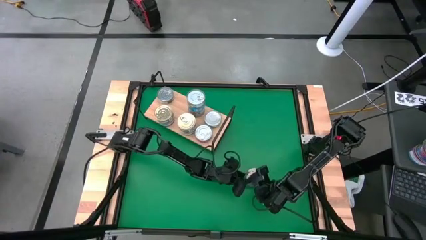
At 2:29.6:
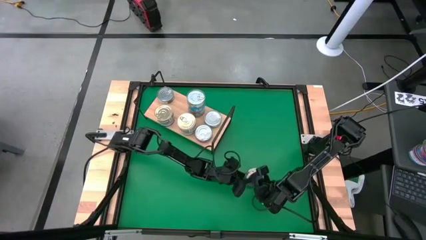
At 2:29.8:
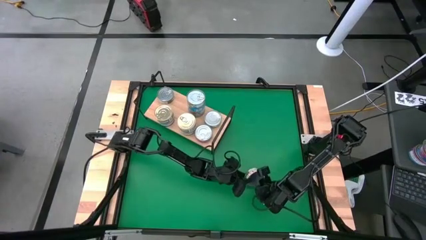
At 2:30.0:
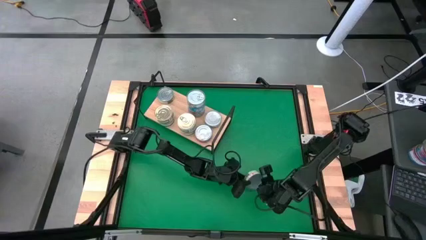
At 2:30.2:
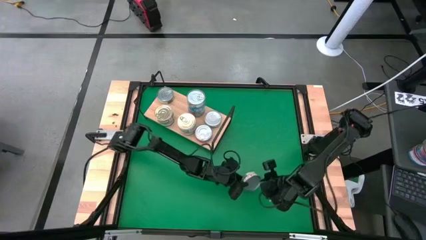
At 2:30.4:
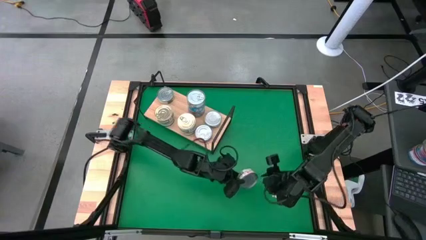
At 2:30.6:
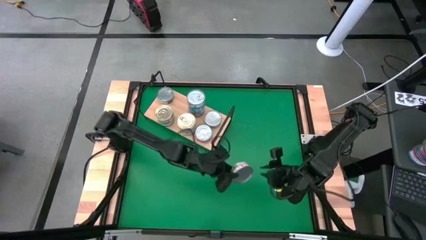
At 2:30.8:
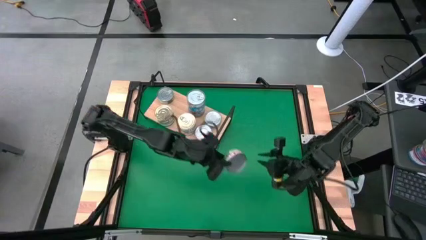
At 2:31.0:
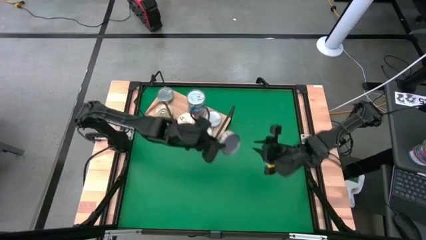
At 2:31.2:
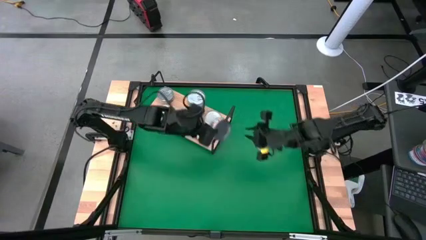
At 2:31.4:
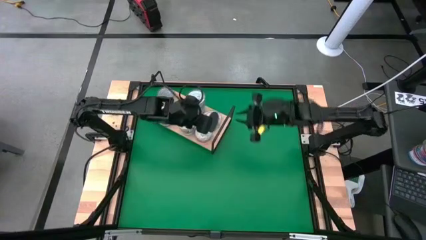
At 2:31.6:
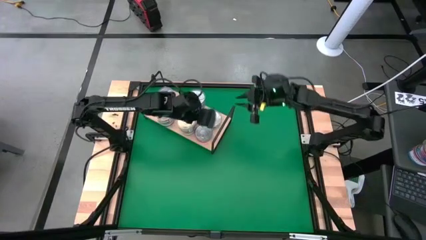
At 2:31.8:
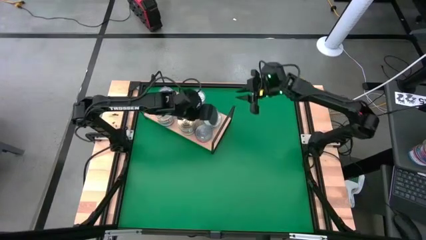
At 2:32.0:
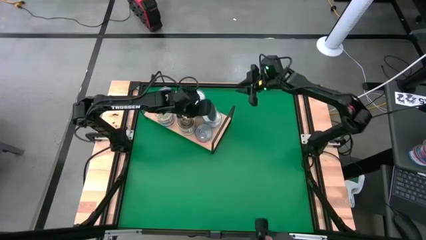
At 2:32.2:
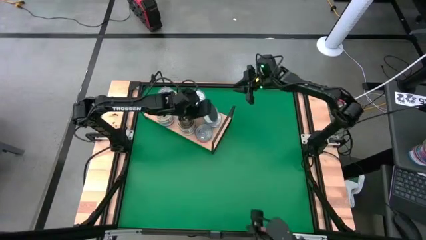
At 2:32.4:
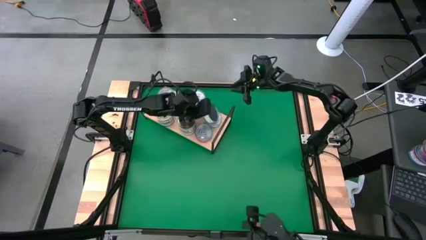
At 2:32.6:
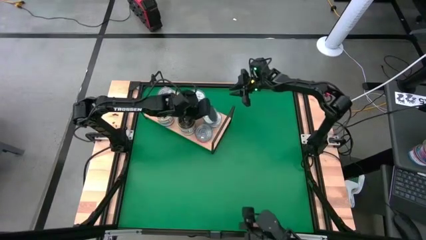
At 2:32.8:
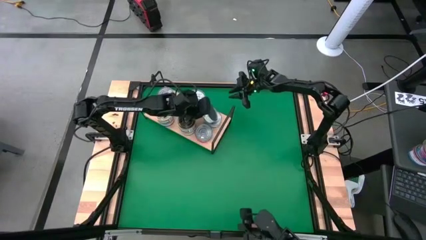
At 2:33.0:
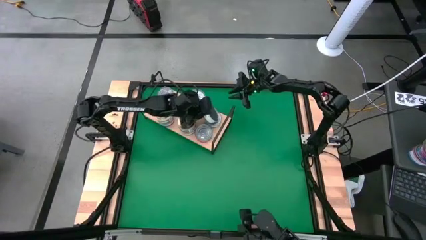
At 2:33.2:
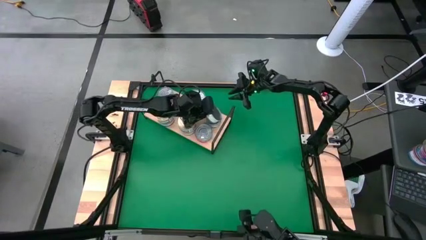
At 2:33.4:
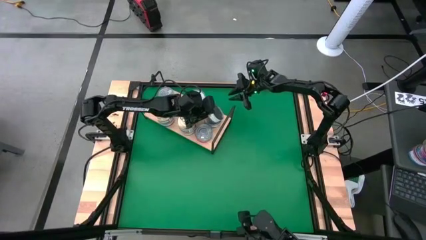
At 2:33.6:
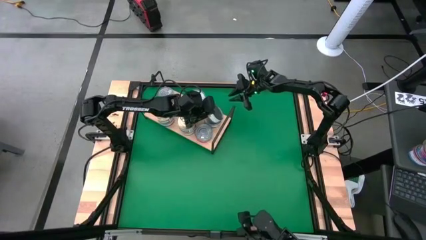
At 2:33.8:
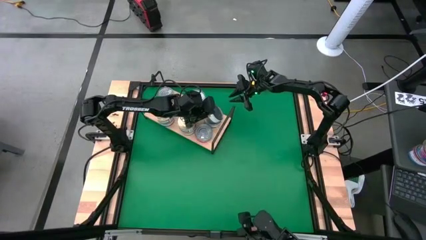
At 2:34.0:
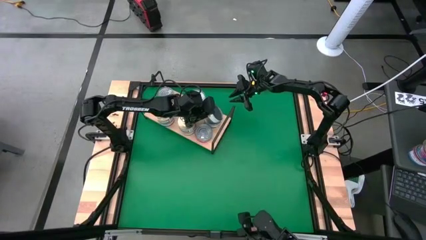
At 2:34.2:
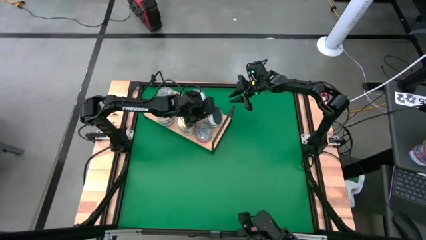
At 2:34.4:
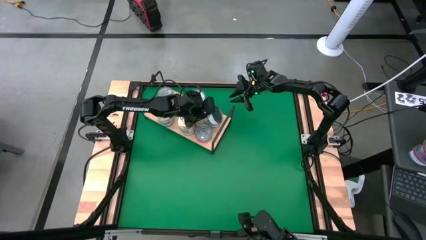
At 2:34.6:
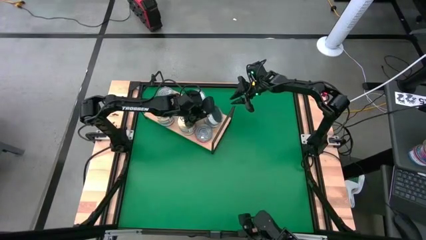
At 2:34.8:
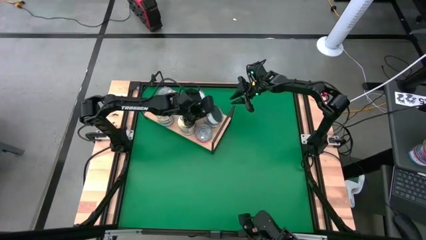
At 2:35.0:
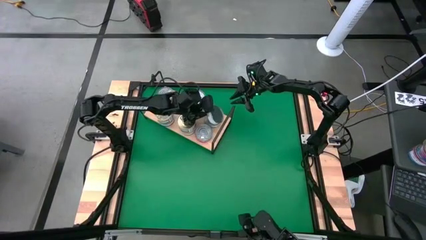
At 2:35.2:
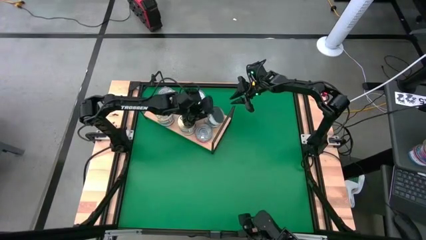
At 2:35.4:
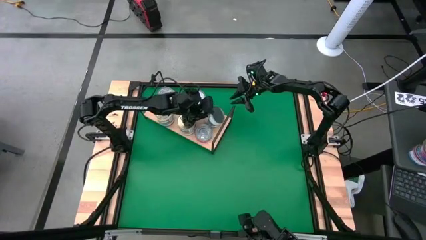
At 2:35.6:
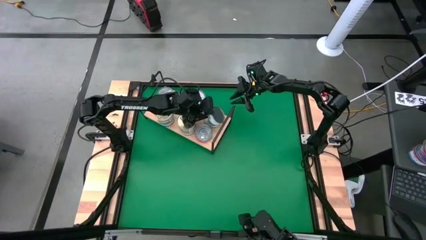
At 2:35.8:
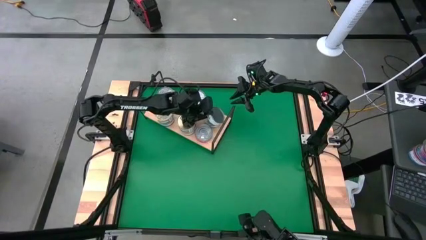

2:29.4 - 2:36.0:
Task: Stack canned seafood by type on shelf
Stack the green tuna can on top of the green tuna can

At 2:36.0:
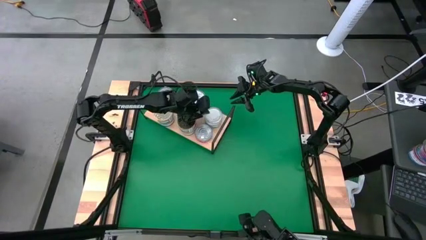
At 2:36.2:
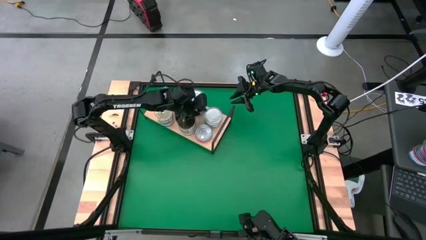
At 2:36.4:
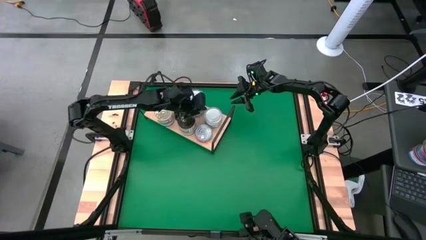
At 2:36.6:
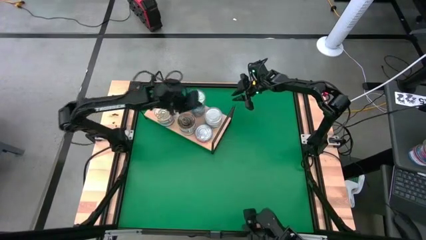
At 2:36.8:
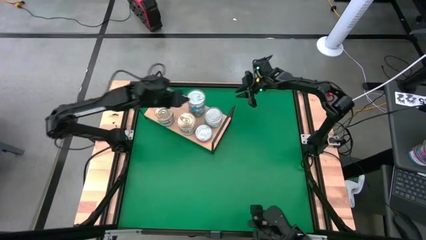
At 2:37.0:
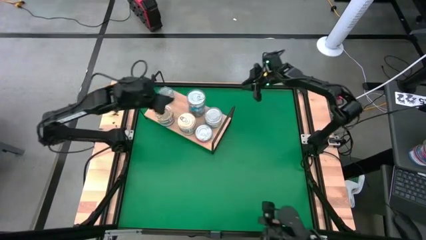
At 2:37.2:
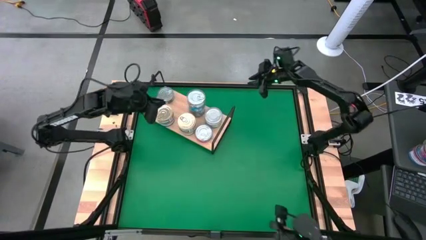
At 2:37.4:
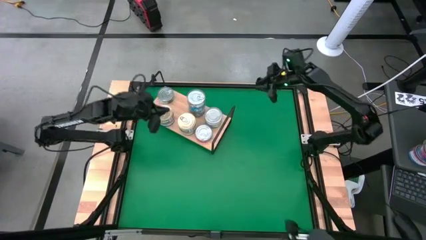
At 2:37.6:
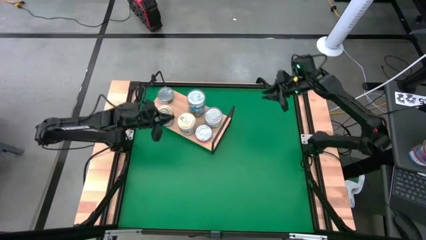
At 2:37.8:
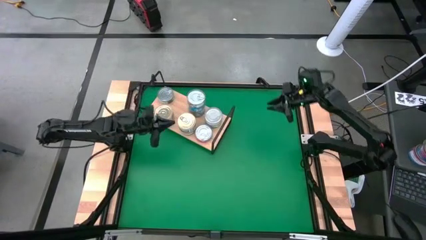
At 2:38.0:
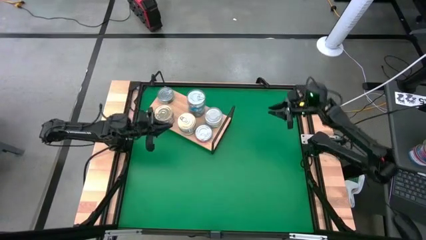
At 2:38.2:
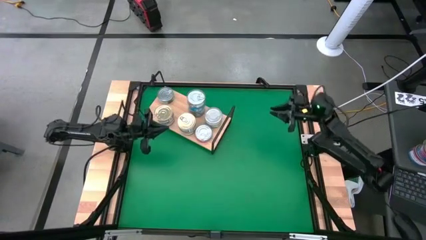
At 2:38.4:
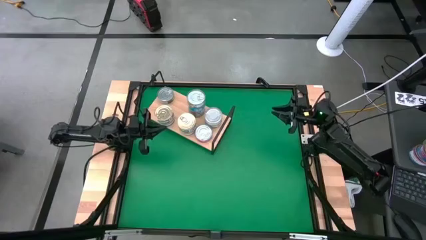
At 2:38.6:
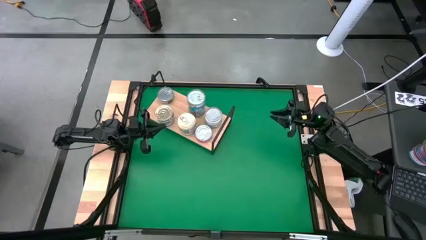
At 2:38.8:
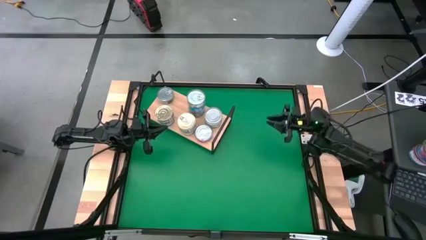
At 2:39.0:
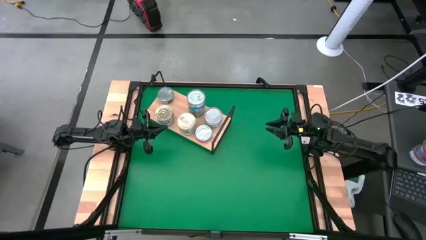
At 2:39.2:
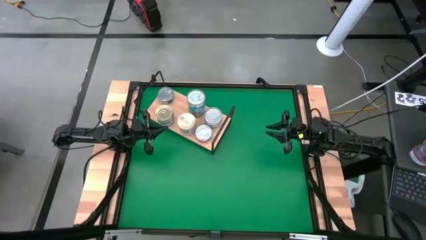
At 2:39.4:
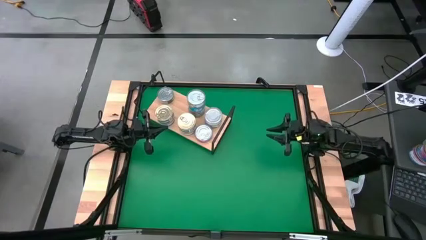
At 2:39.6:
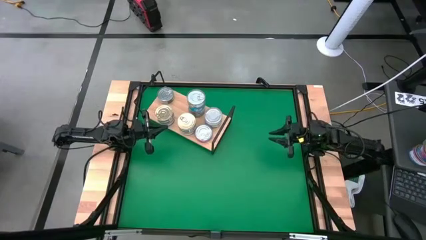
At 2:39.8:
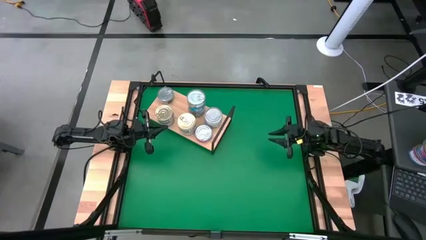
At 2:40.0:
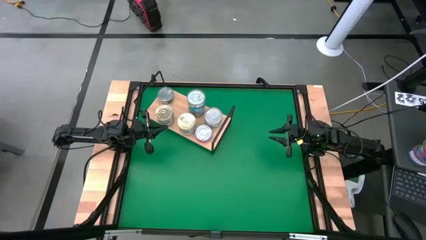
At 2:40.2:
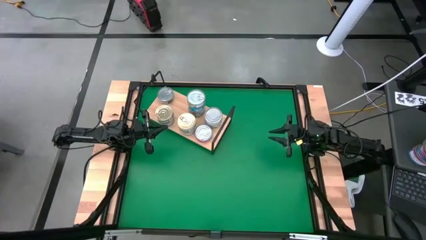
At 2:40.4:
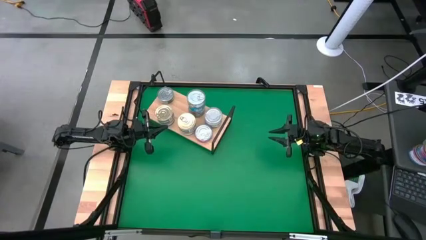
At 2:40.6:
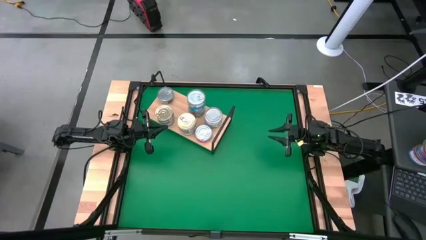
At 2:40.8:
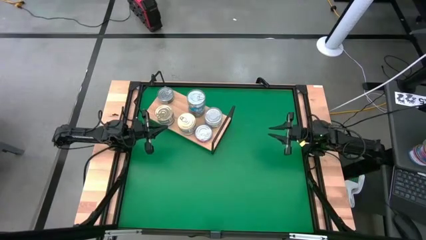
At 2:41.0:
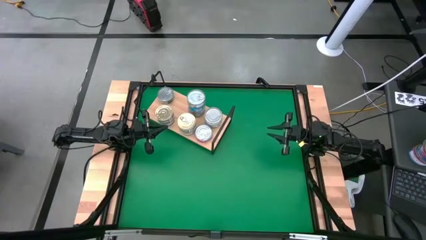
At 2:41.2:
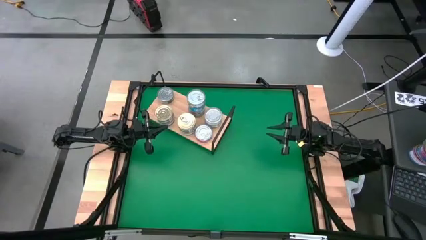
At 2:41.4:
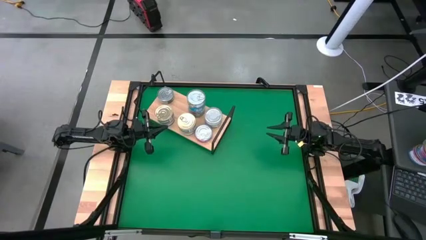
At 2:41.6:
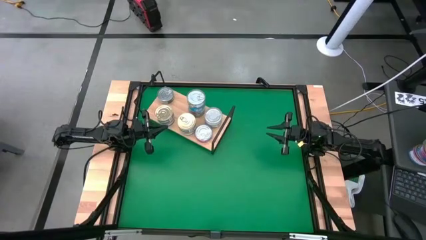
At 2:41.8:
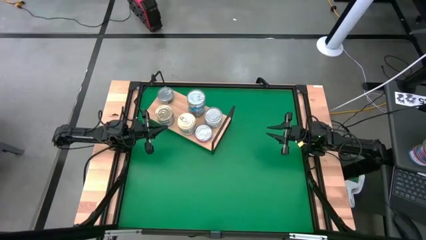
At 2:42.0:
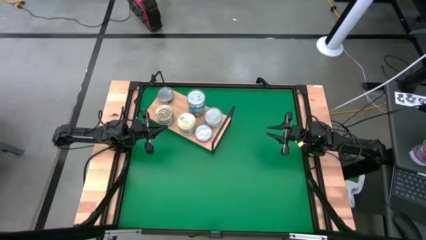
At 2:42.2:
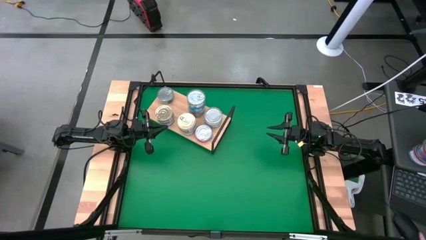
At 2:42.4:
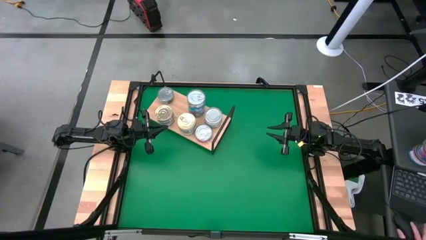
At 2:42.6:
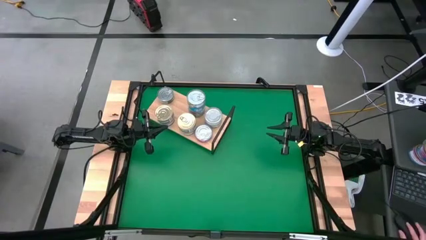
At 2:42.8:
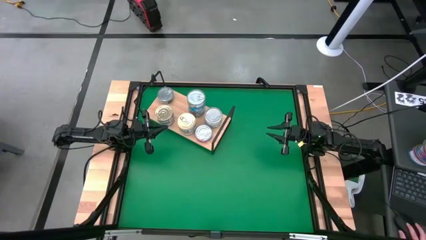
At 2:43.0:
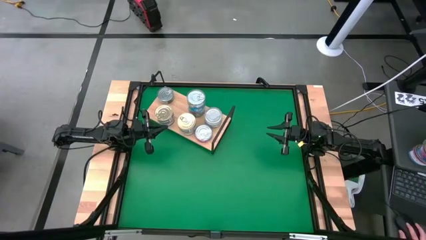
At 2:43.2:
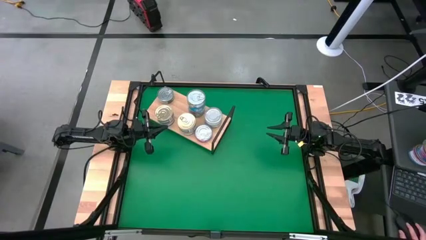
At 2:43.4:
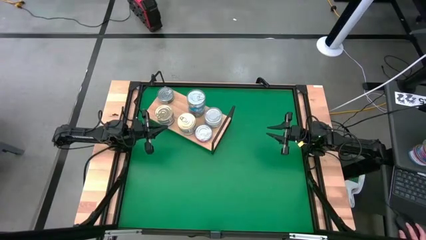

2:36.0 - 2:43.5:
Return to Home Position
